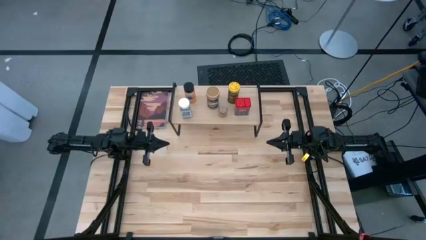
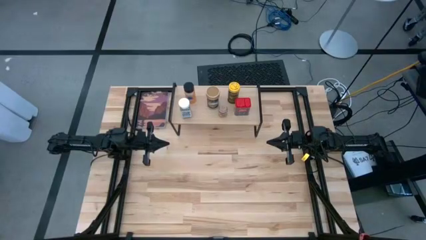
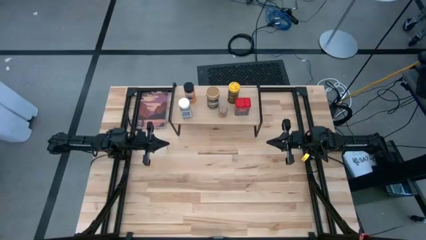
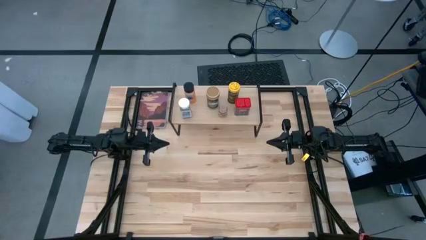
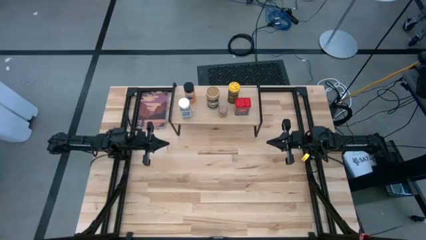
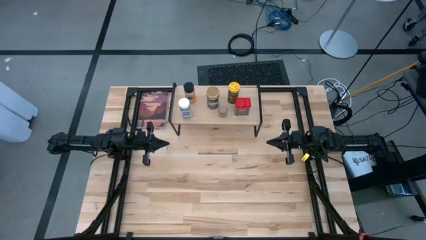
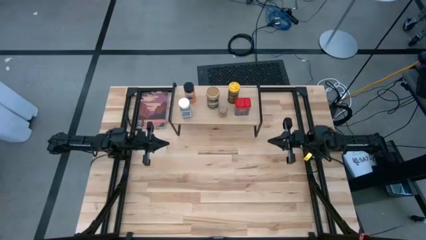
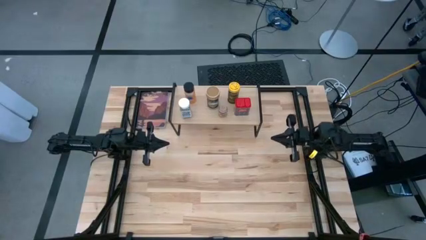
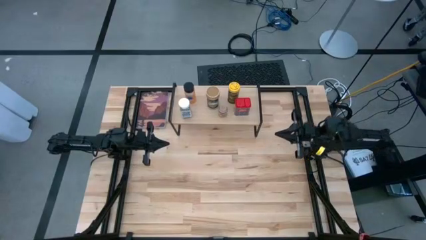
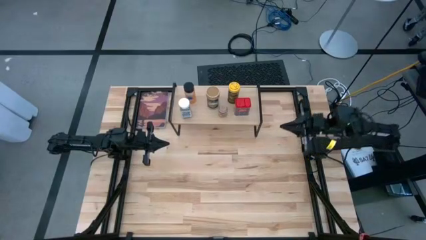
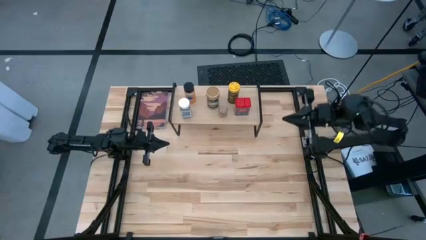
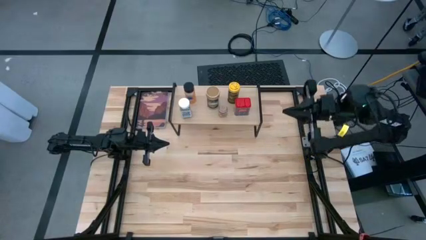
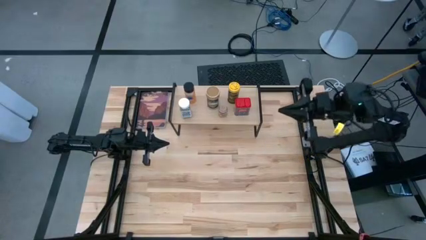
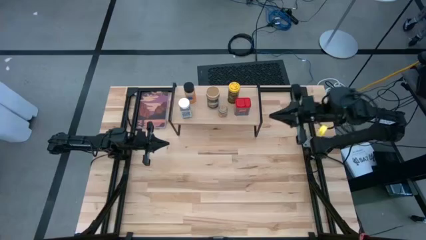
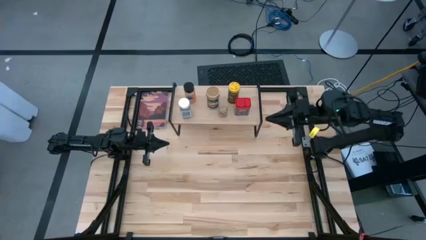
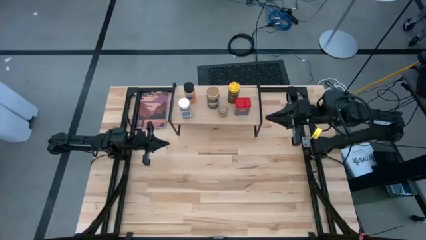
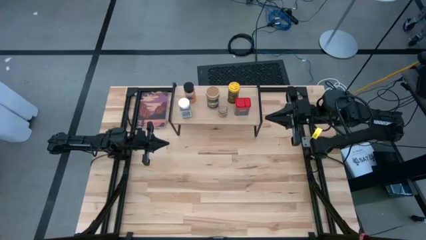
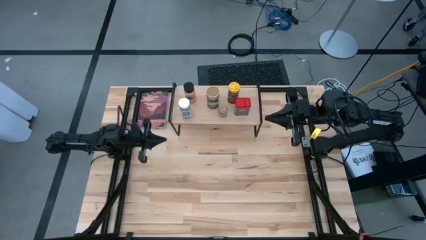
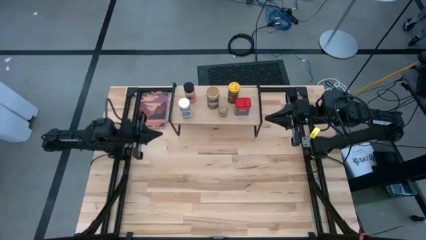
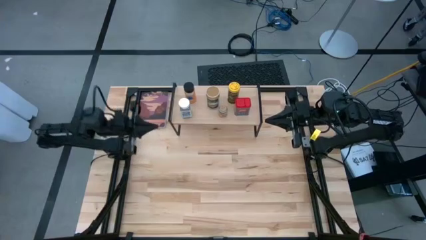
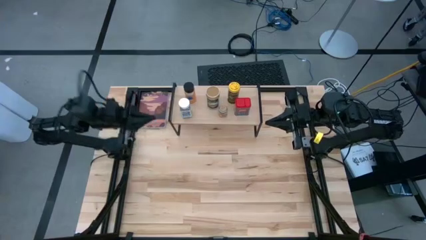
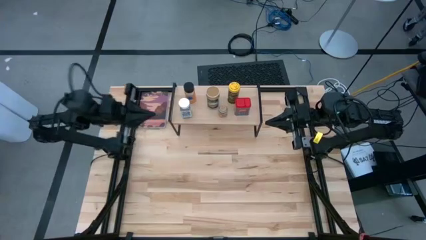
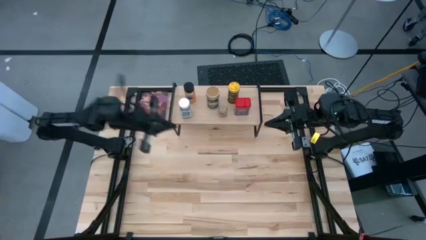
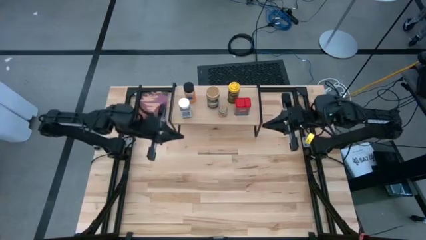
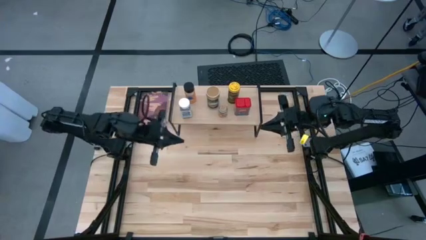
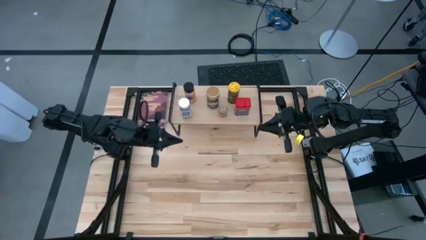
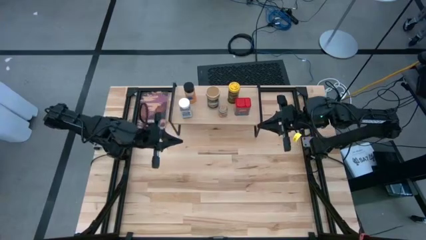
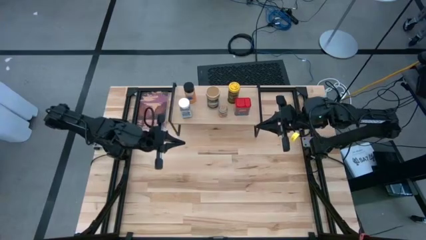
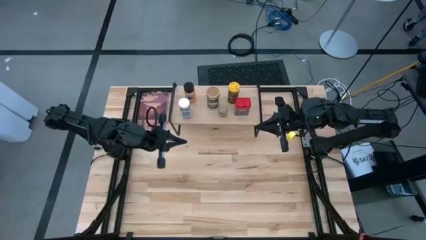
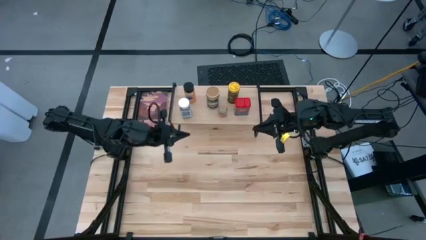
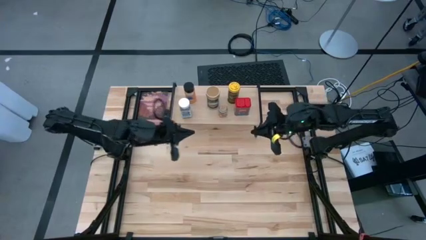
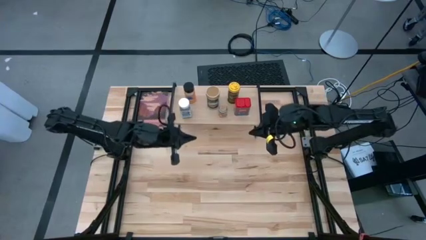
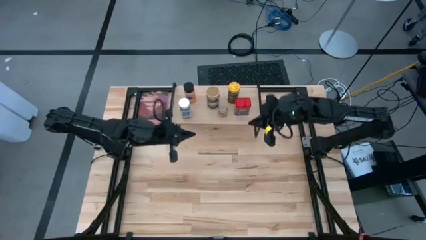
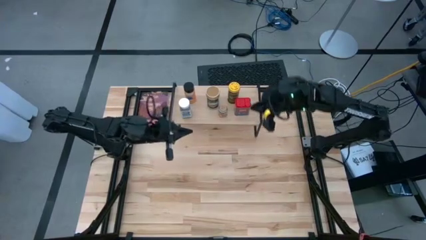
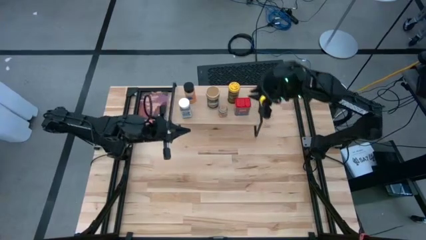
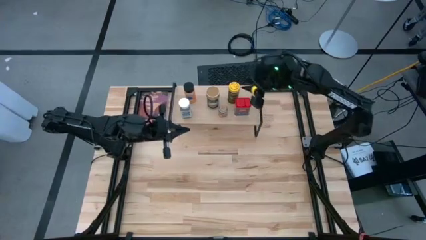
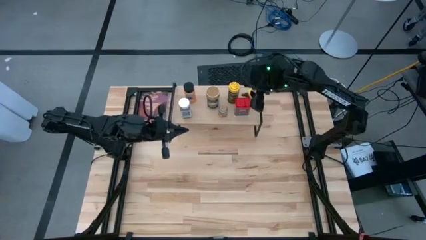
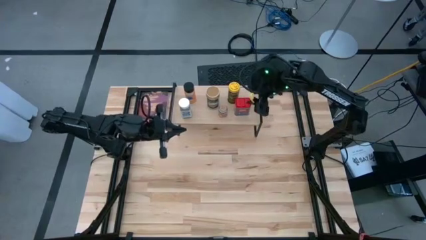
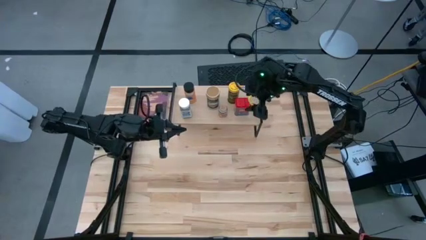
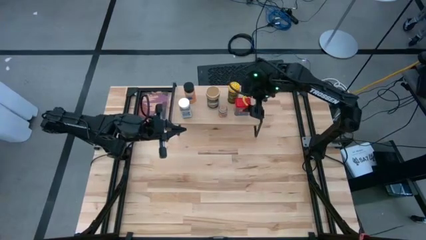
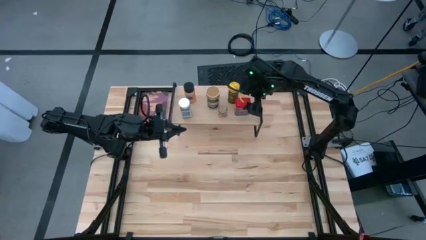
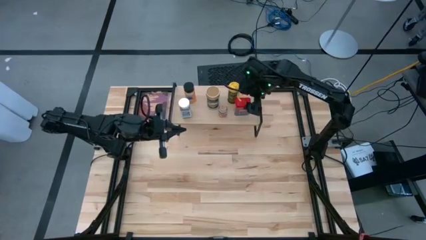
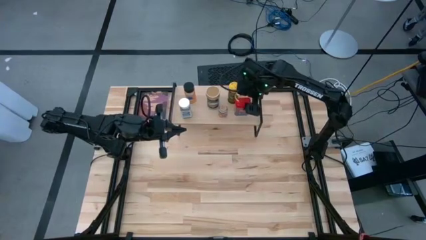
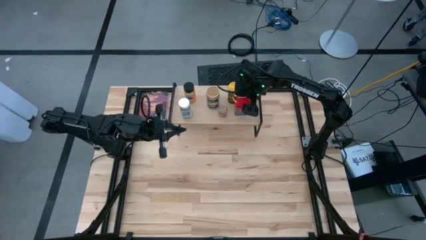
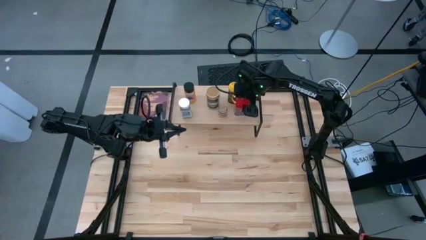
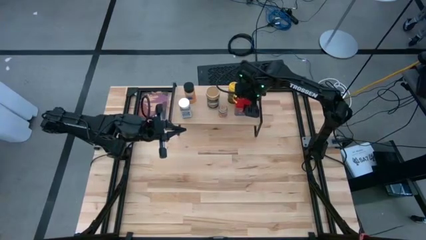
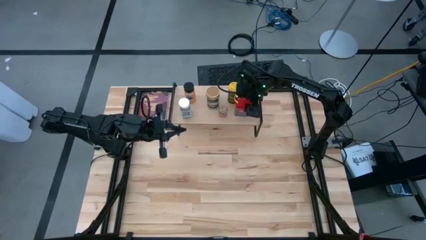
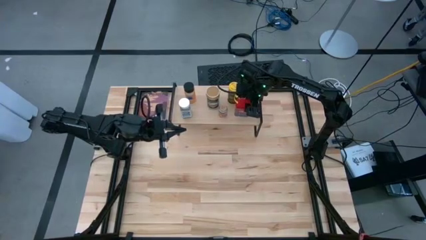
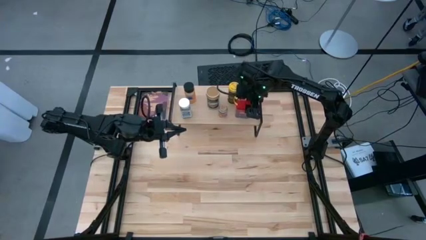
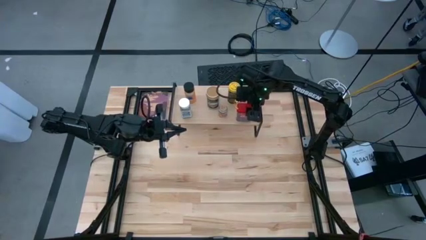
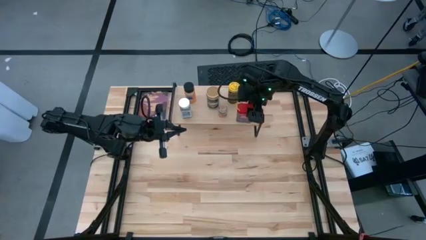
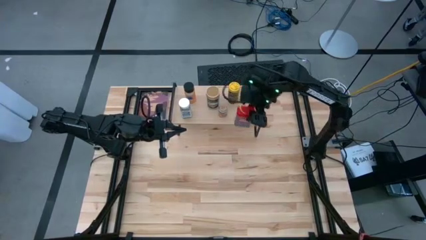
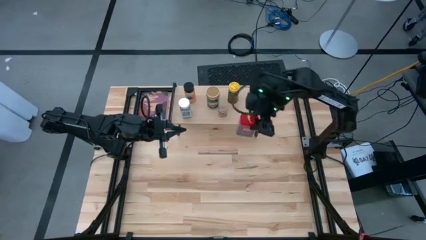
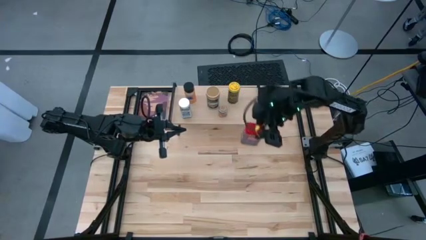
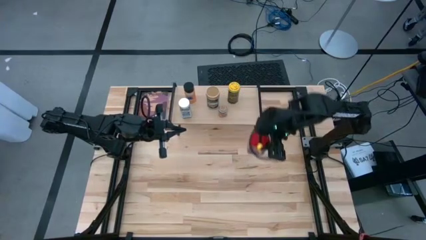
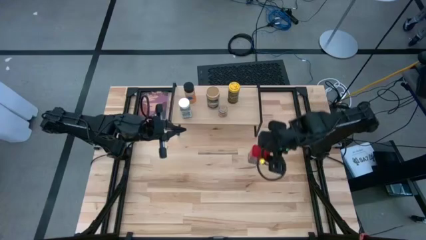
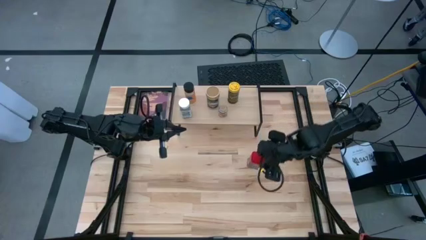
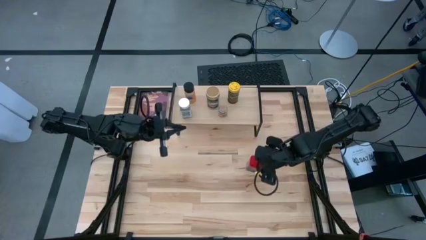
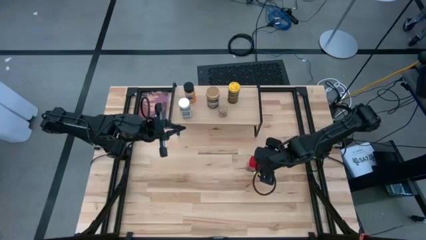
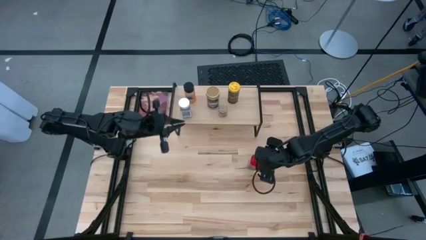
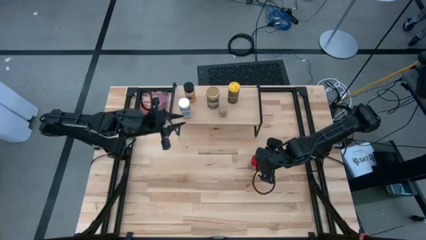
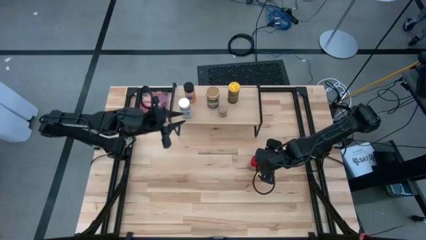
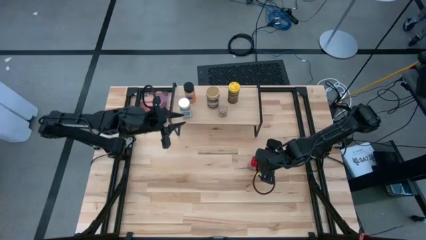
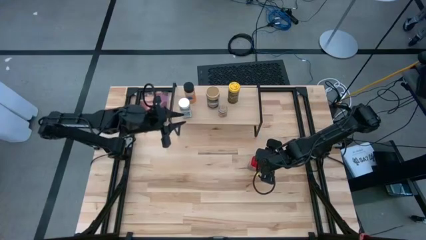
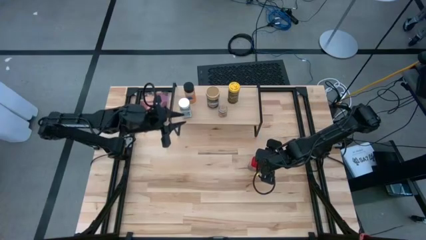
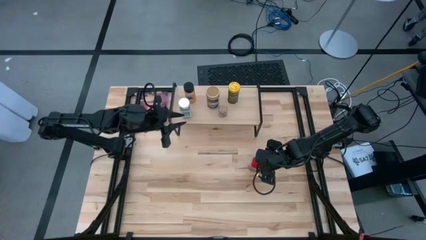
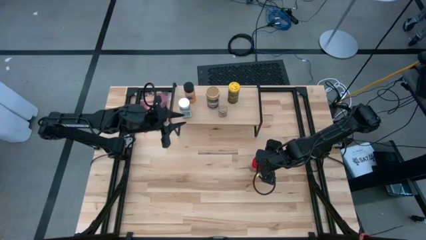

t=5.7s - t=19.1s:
Task: Shelf spices
Remove the red seasoning can from the shelf
